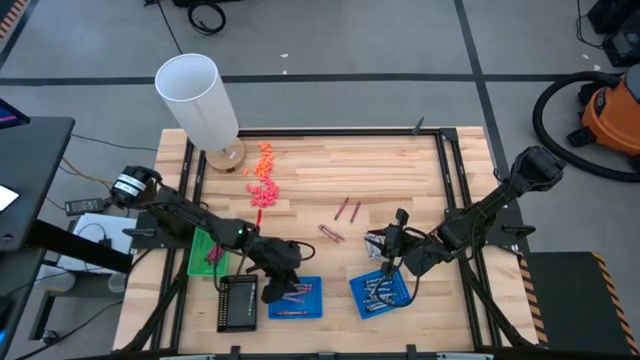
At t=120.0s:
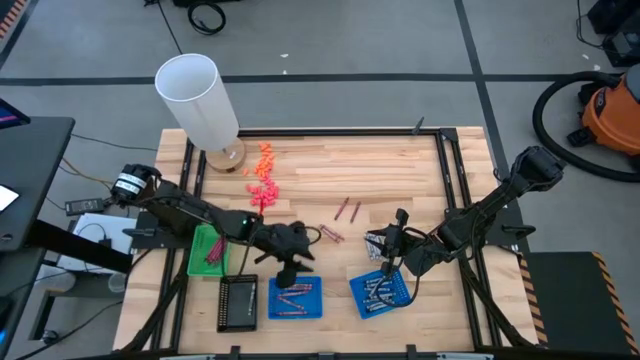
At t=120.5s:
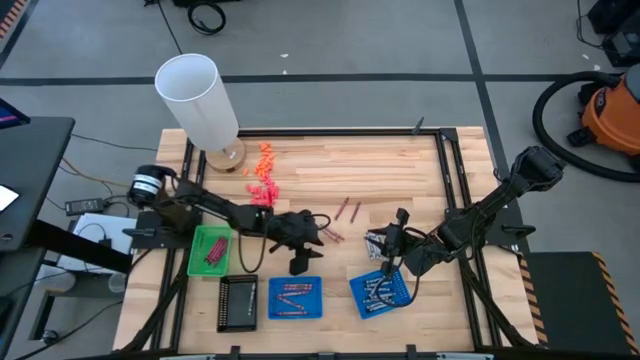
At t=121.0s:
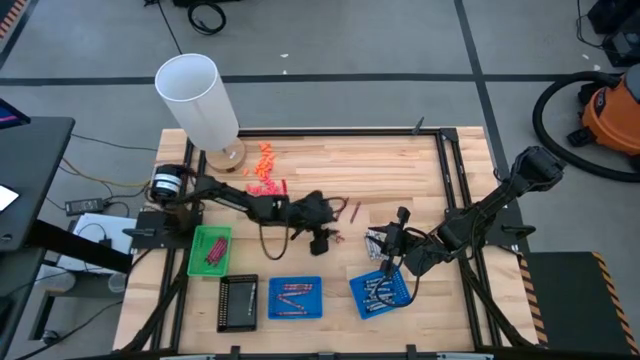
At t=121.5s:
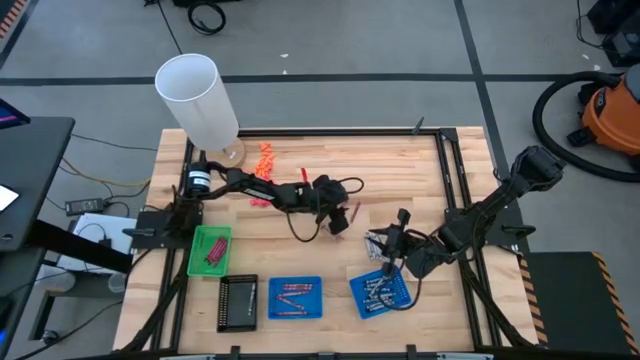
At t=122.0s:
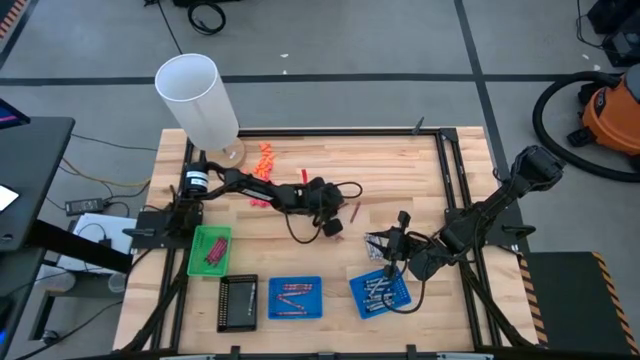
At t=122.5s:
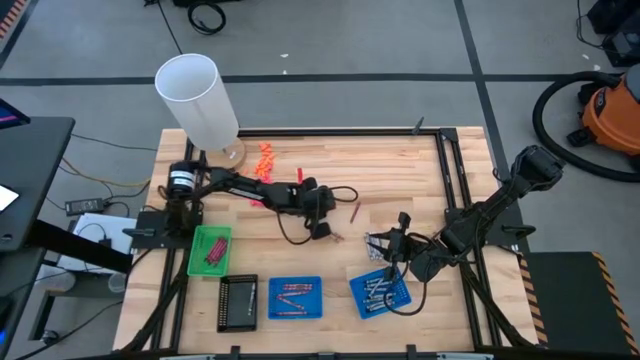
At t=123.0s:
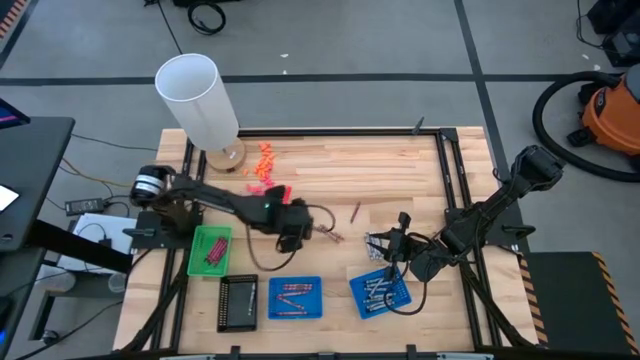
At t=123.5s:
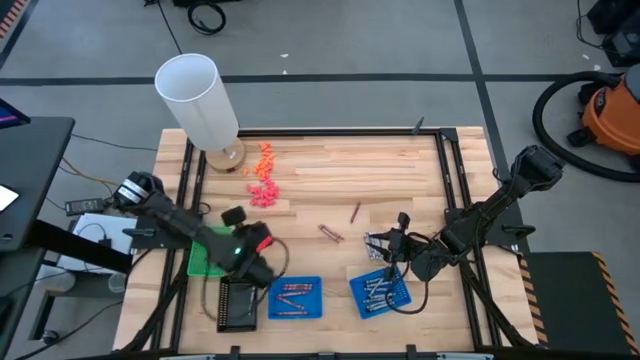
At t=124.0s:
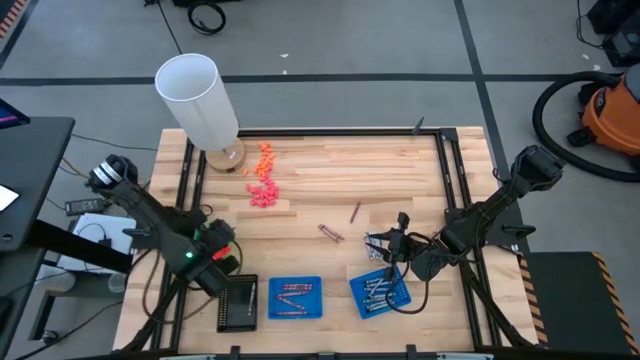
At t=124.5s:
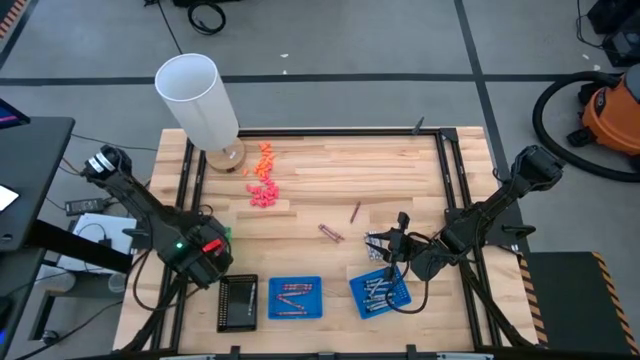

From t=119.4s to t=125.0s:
Task: Sort crayons
Put the red crayon into the green basket

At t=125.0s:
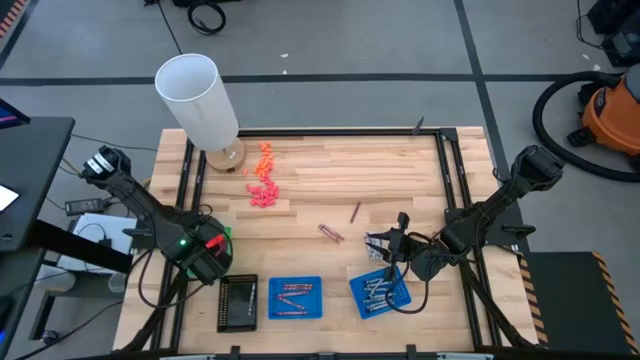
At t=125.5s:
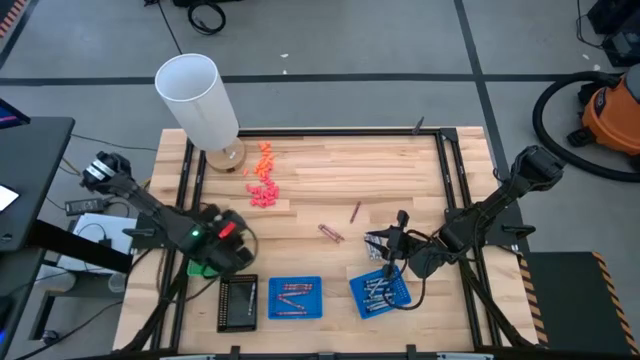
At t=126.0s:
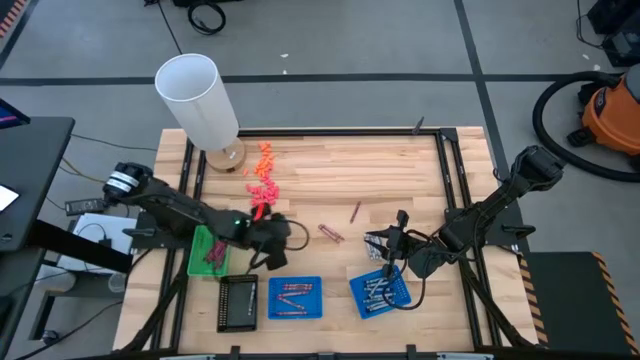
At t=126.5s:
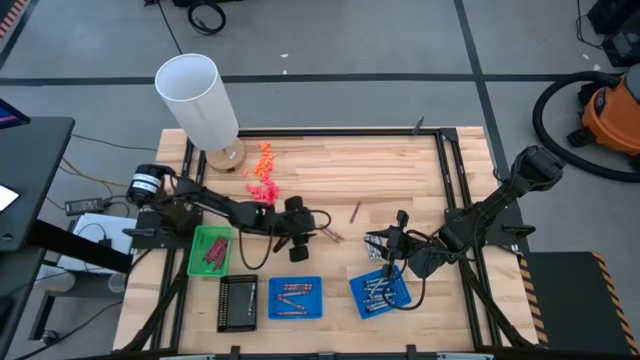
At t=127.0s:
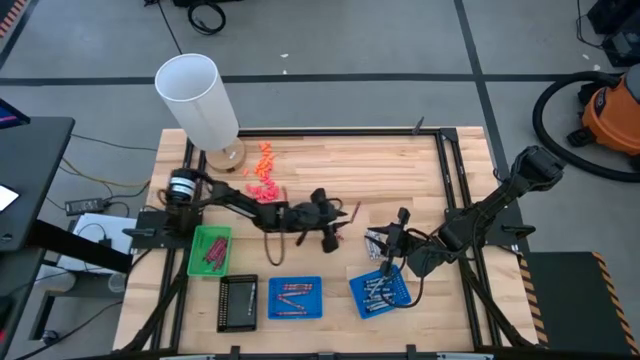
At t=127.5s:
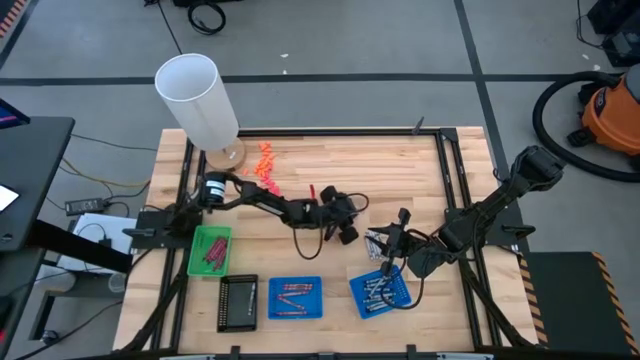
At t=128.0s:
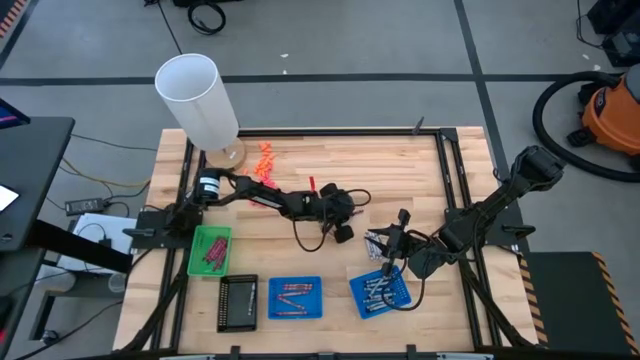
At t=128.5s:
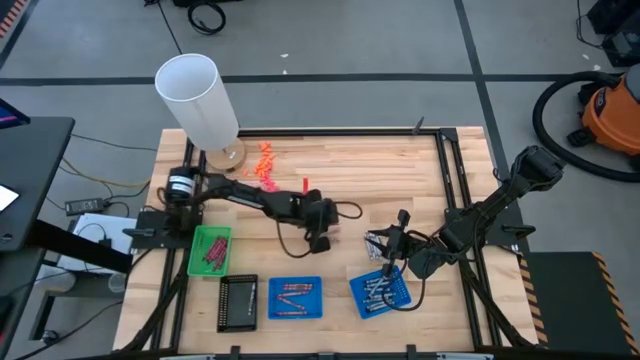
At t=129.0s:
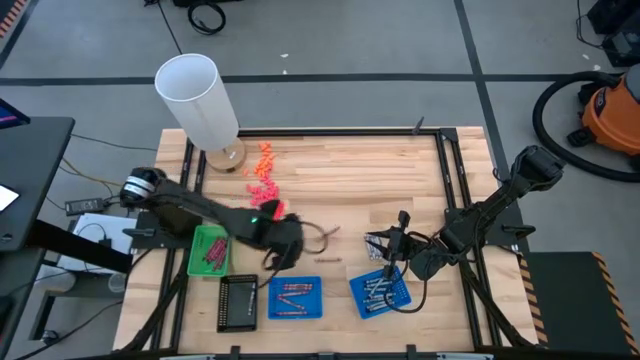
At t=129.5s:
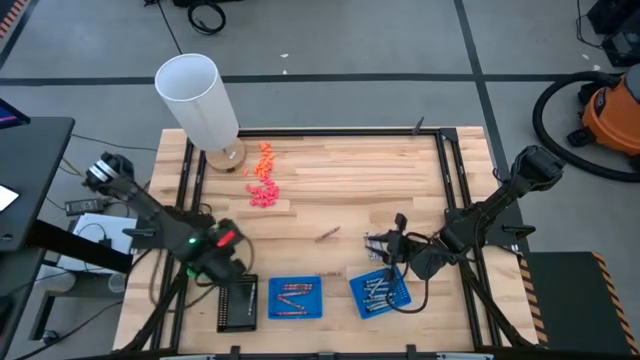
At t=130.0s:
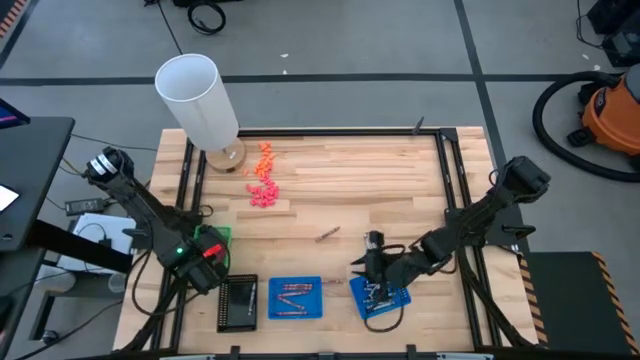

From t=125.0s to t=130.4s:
Put the red crayon into the green basket

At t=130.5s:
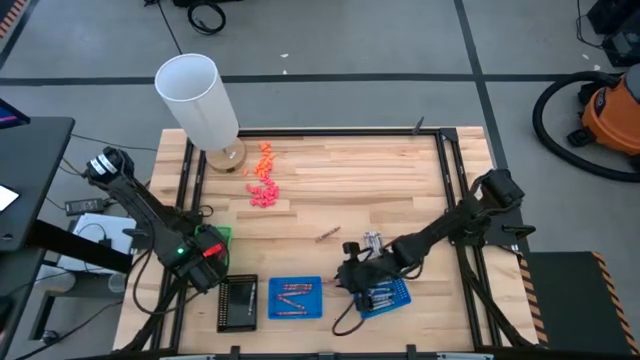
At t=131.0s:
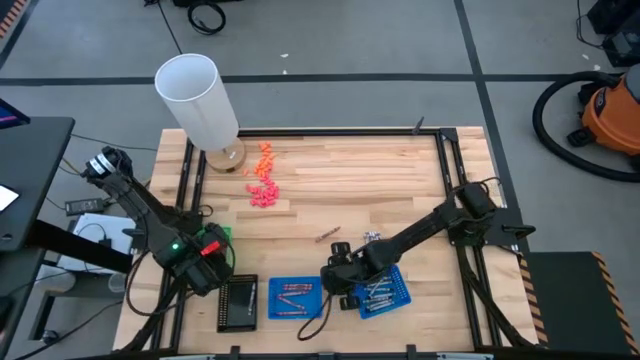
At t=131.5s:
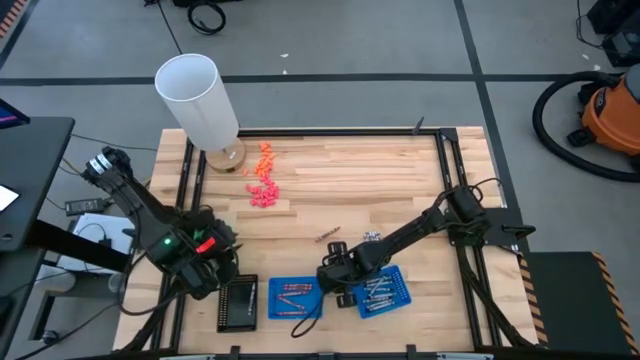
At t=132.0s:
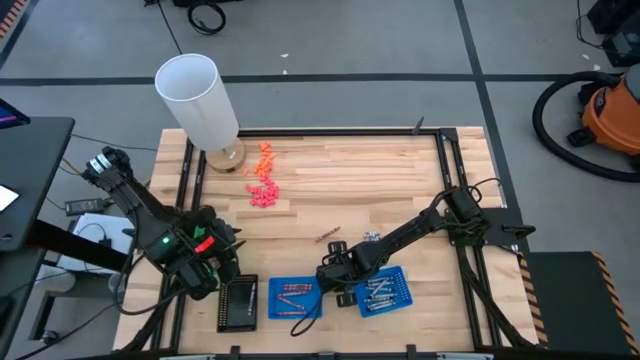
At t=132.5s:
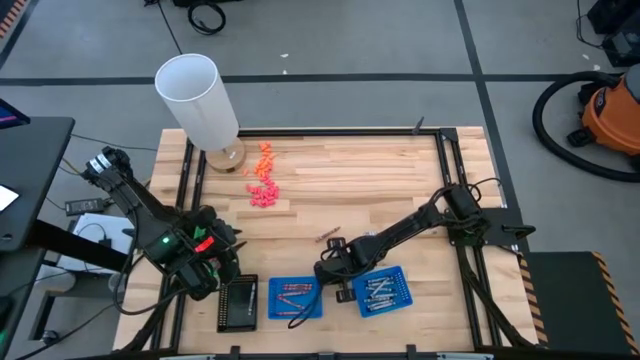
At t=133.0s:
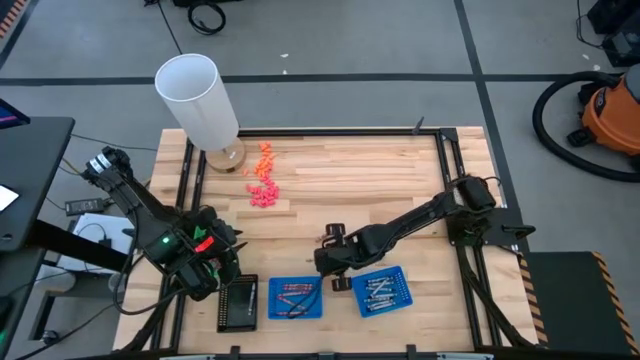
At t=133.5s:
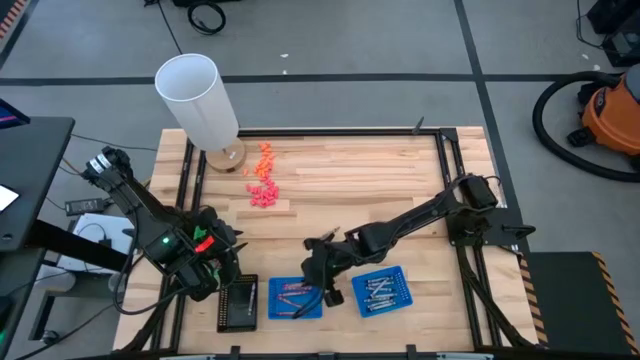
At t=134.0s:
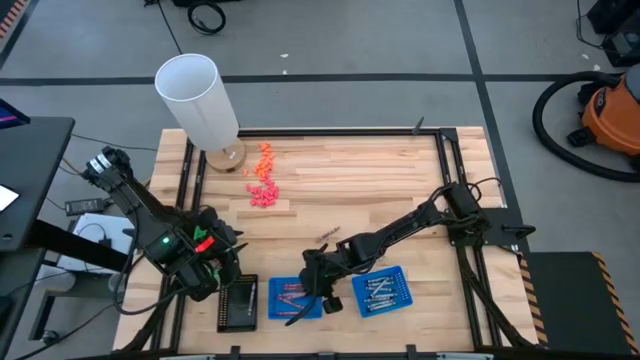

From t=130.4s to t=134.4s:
Put the pink crayon into the left blue basket

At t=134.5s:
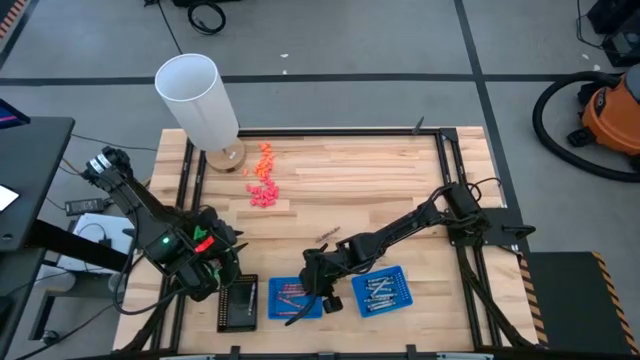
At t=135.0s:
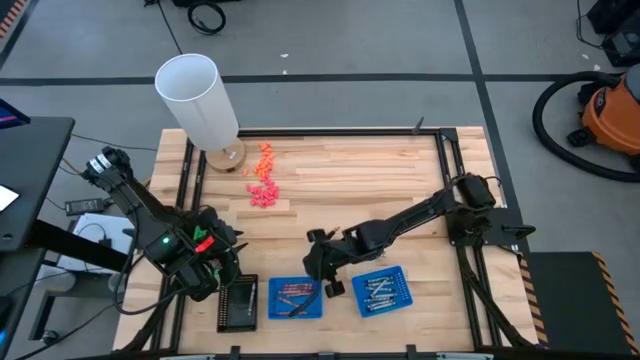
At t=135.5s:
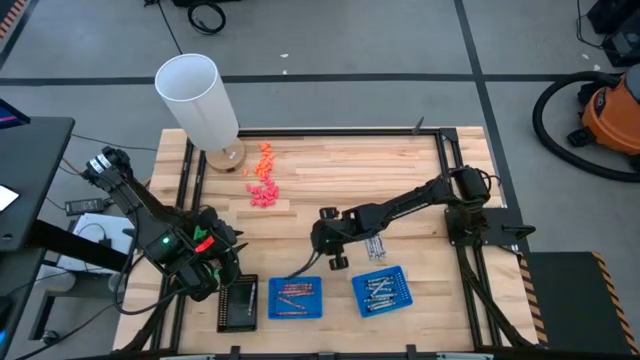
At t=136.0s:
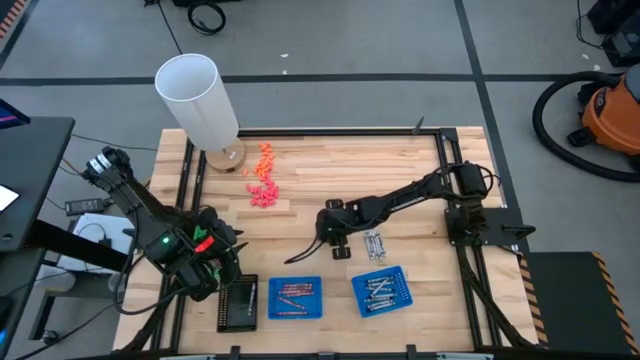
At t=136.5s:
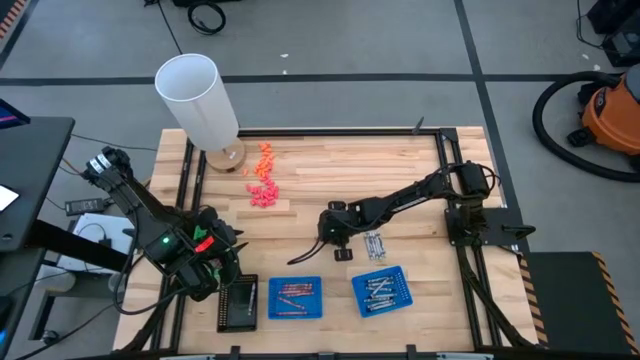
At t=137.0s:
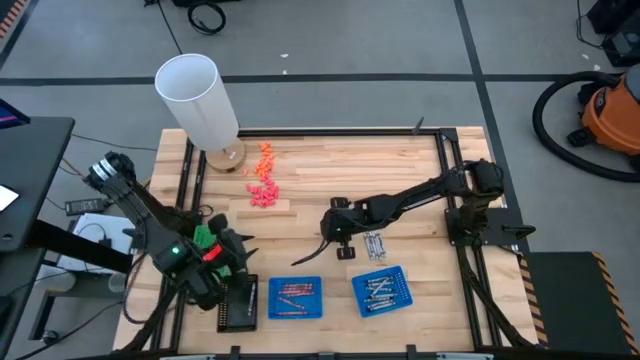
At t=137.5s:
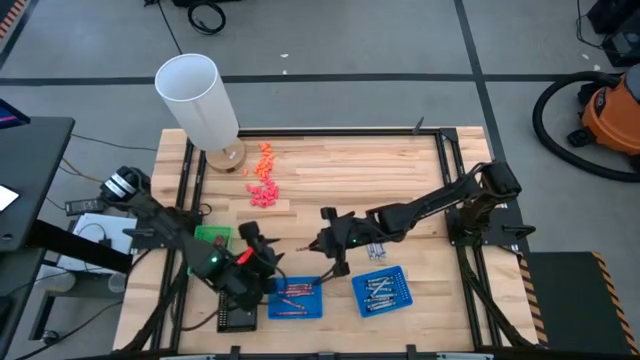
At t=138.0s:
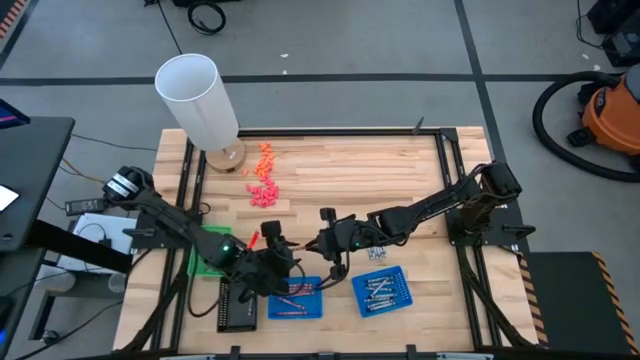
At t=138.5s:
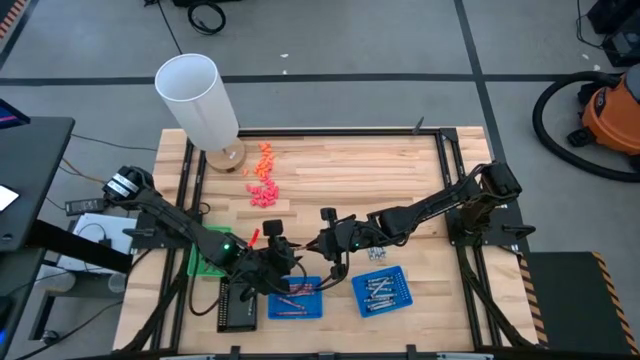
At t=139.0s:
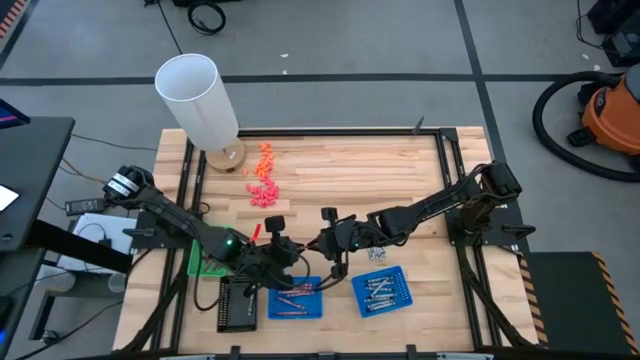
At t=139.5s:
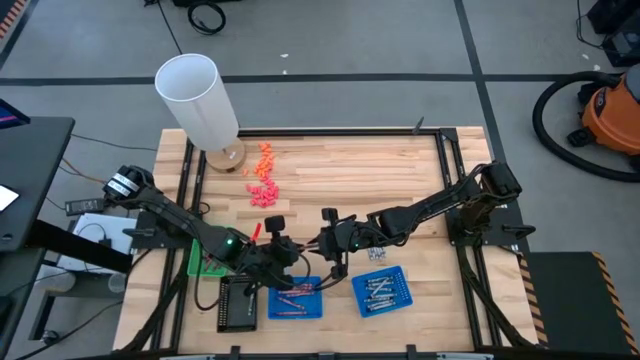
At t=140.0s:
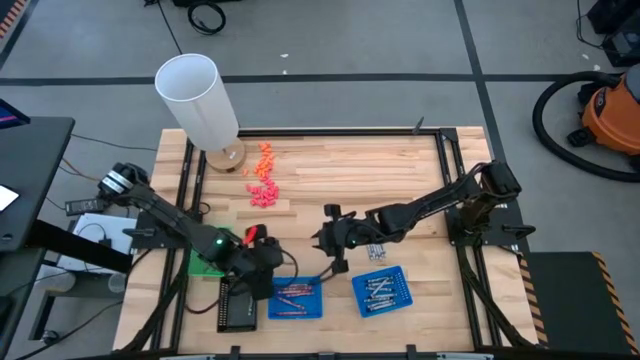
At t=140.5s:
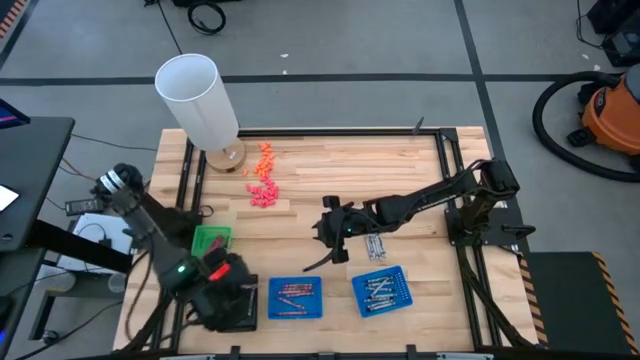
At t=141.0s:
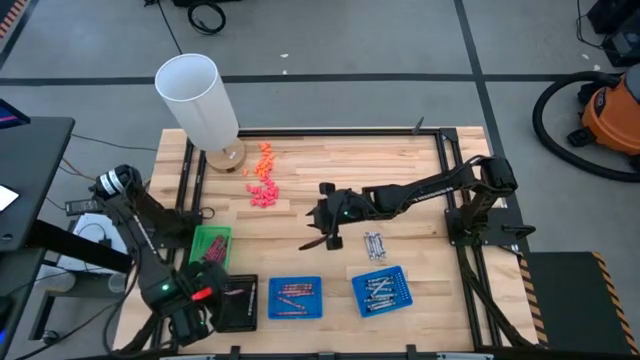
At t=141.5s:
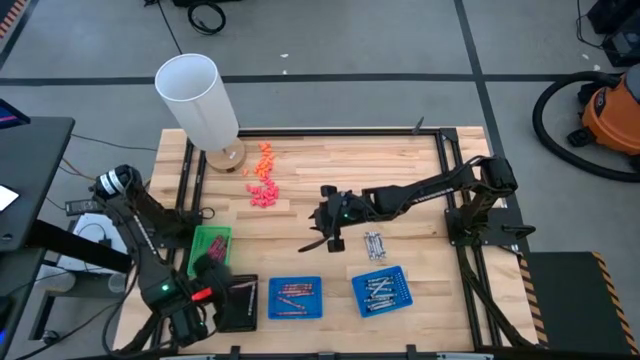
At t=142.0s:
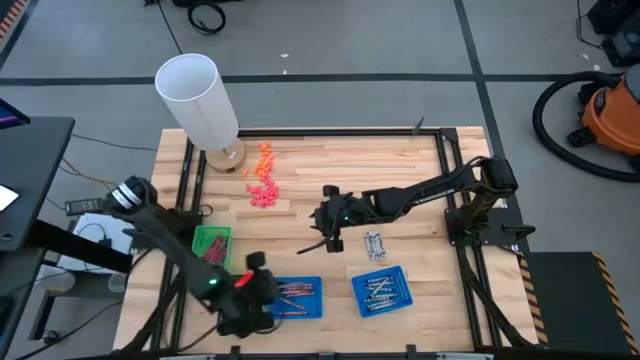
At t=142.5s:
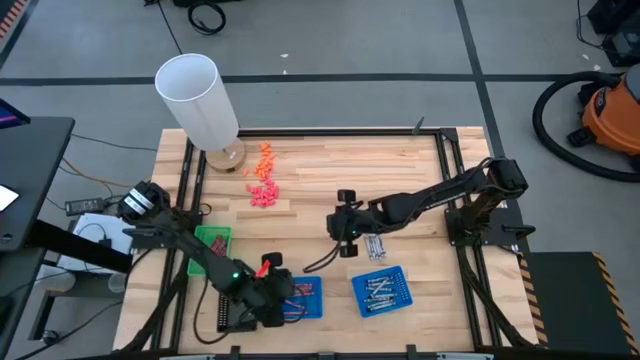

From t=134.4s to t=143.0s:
Put the pink crayon into the left blue basket
